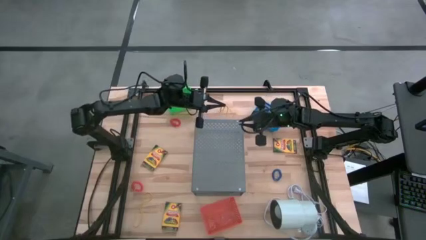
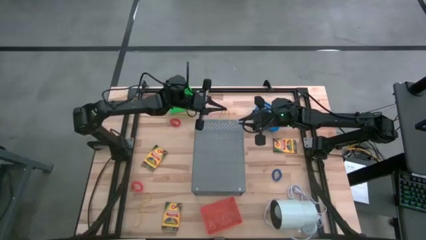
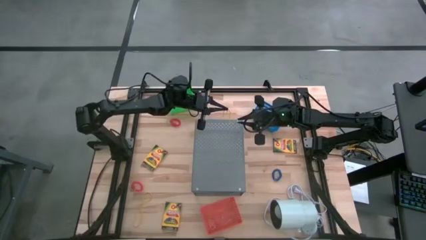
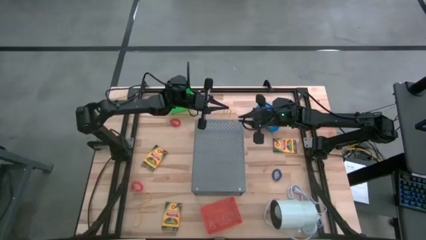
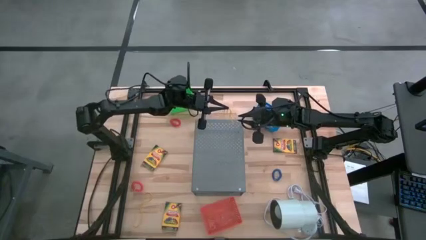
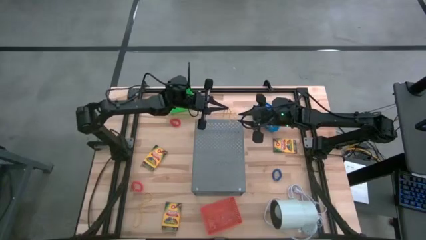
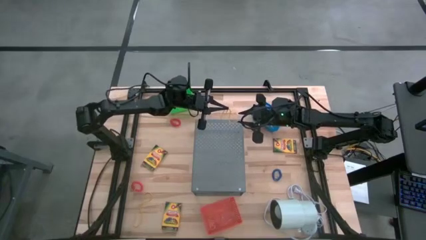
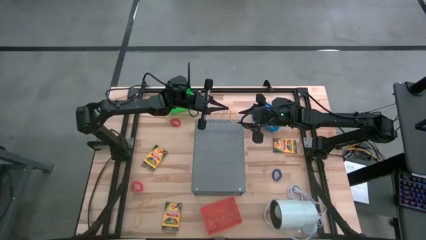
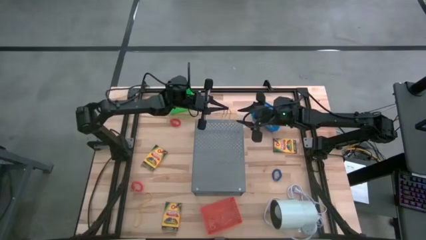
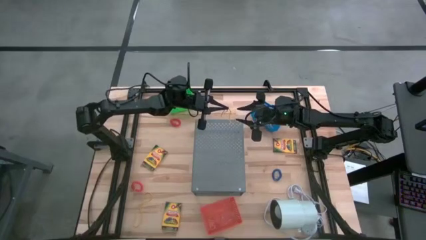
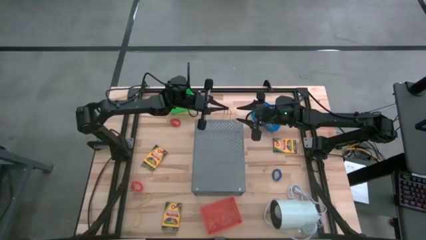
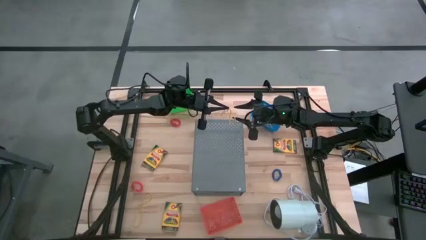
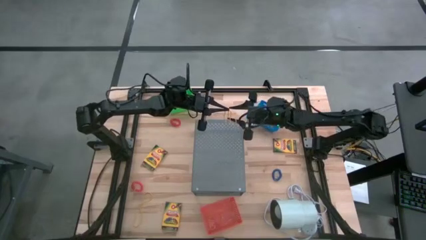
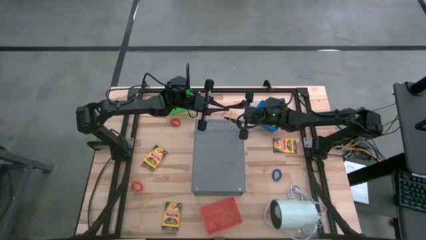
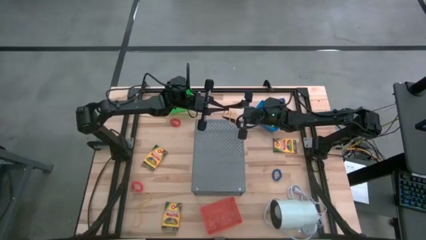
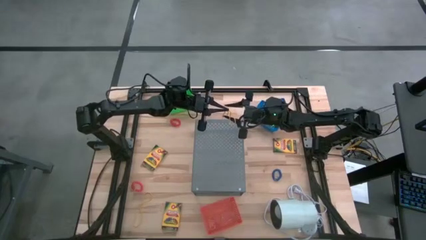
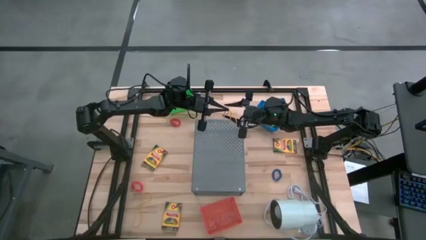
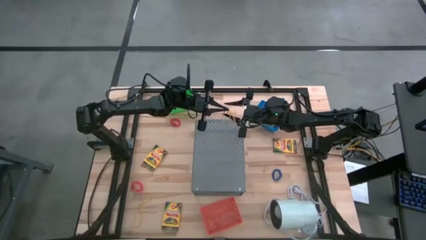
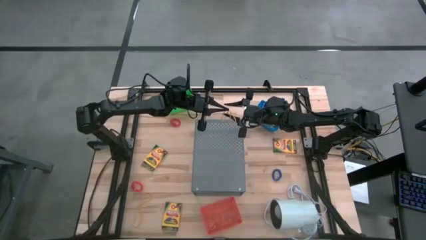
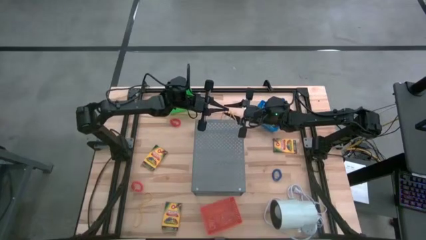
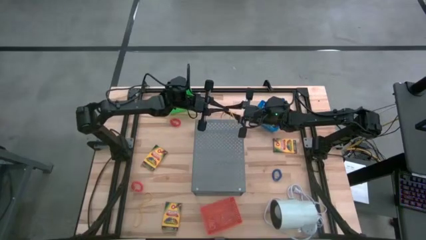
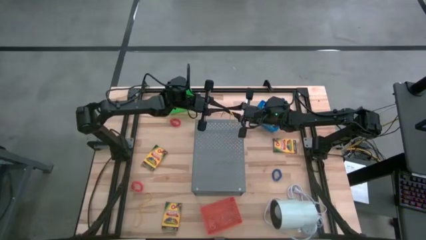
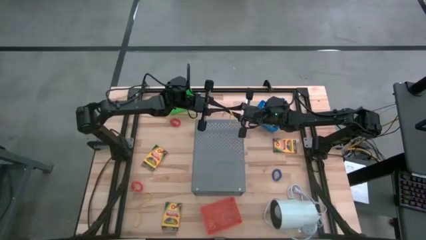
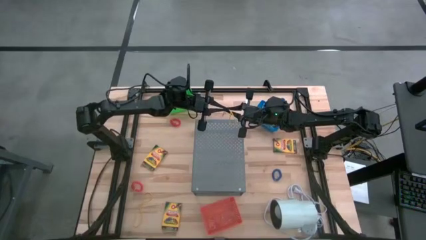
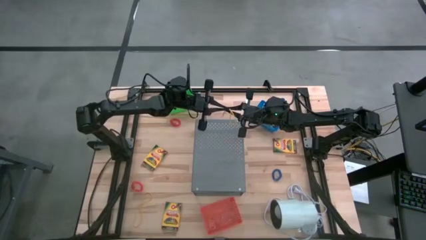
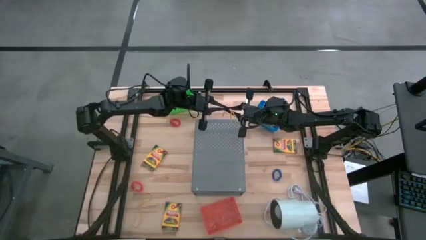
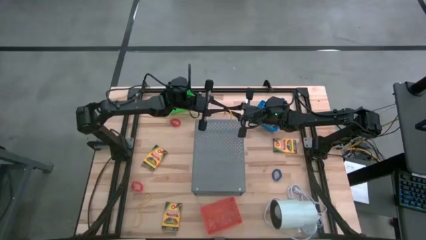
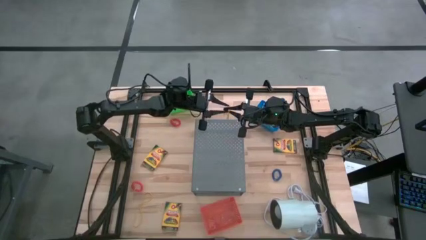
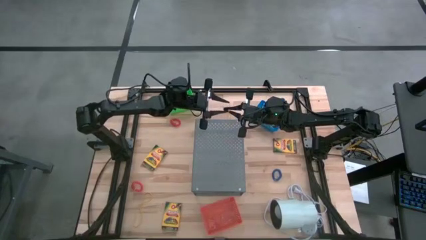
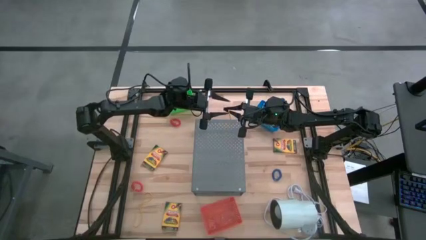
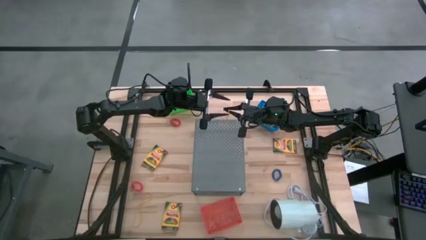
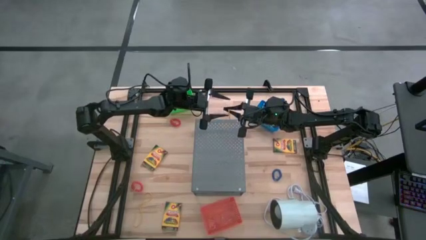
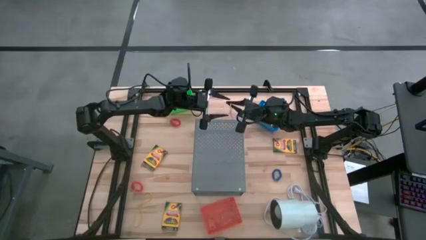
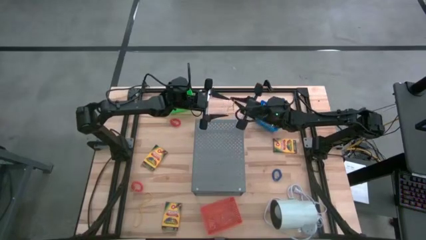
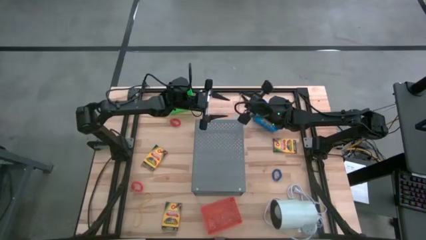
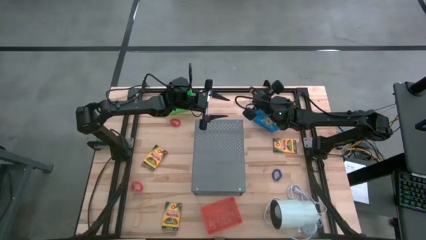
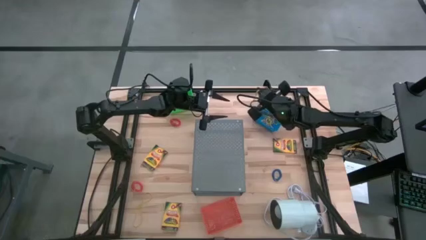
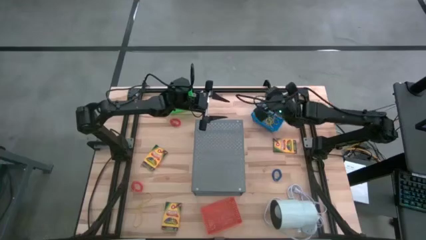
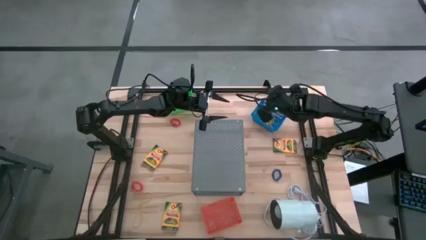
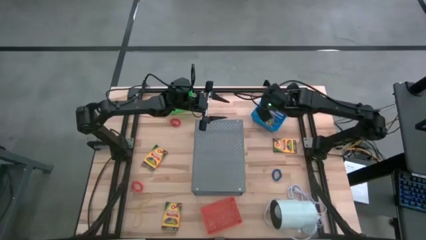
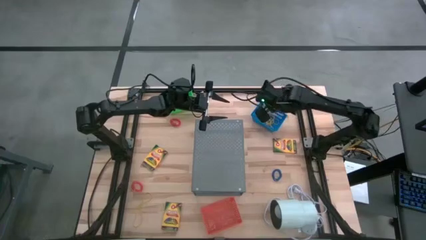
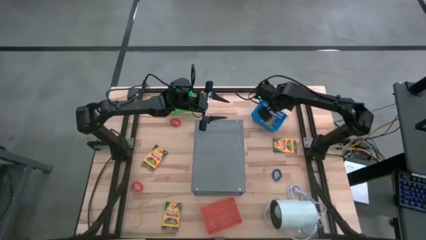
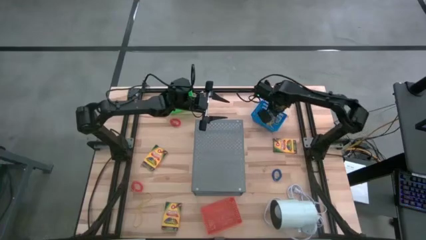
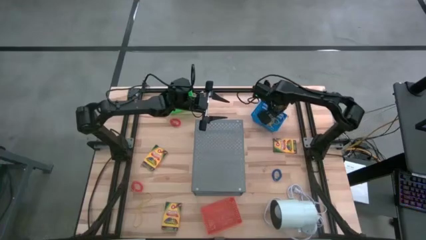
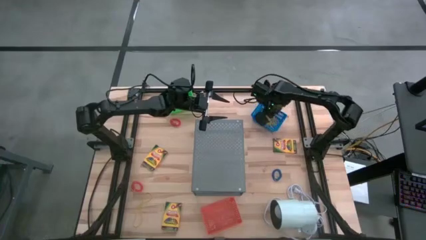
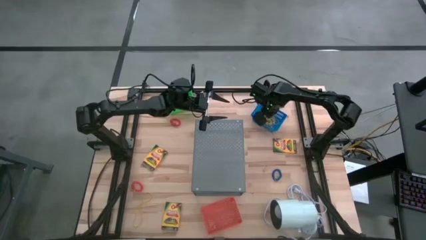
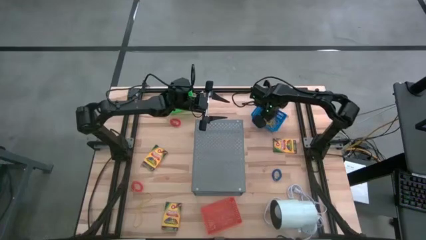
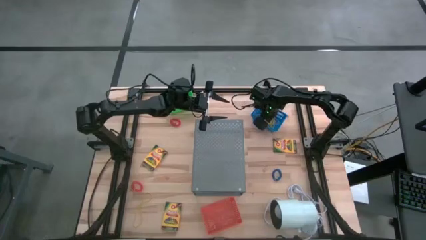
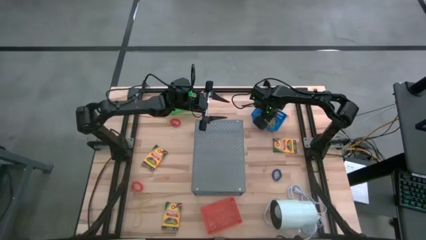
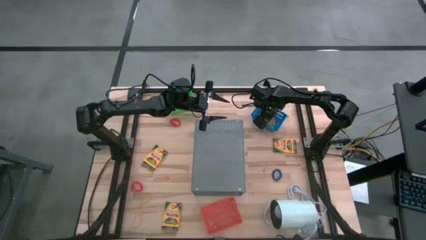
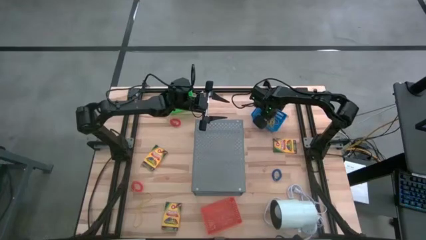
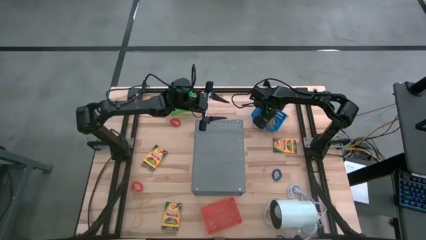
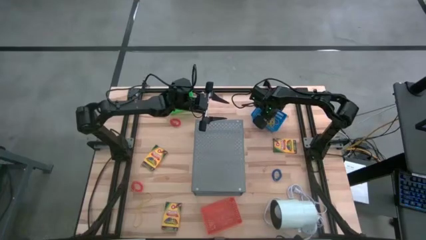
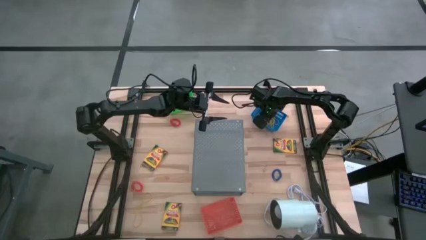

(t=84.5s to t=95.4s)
Task: Pick & Place Office Desk Supplies
Put the top yellow rubber band into the blue basket

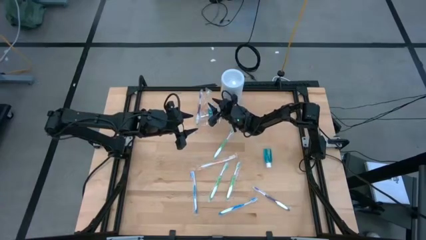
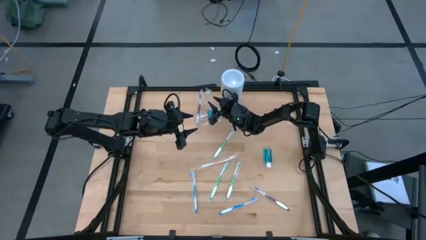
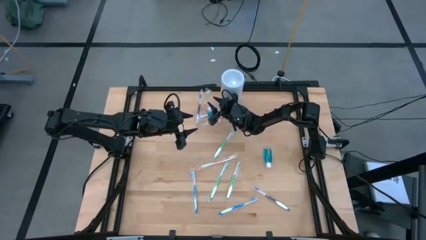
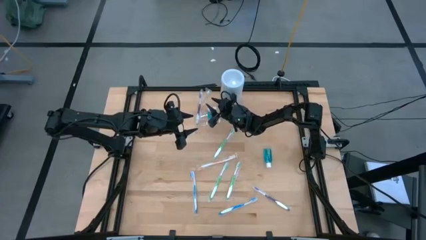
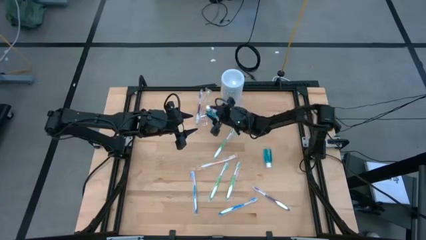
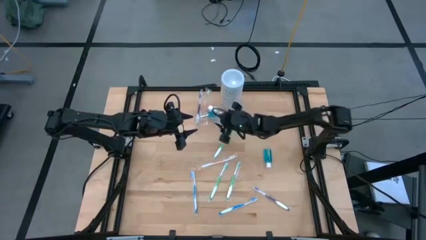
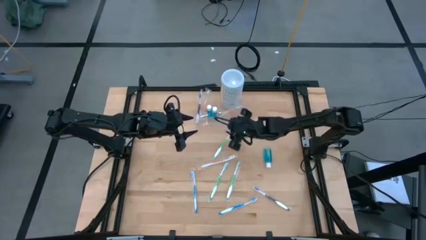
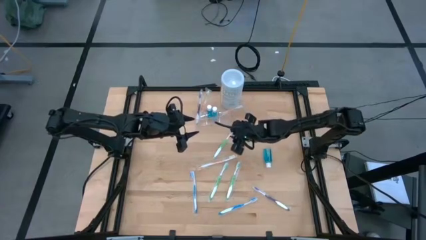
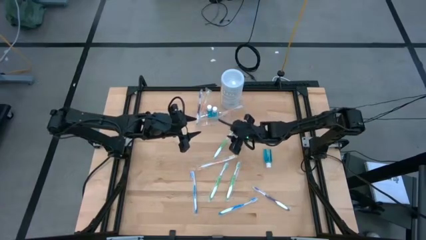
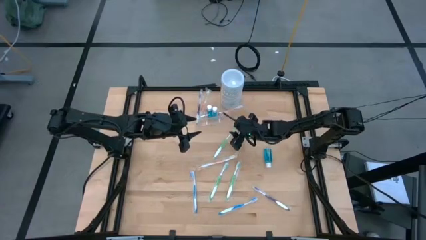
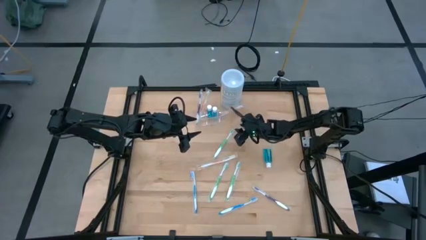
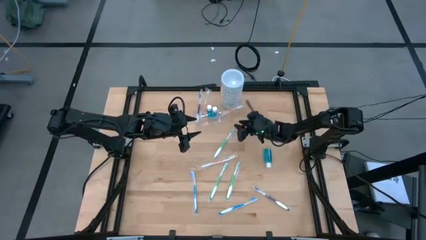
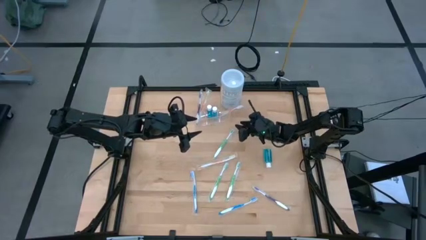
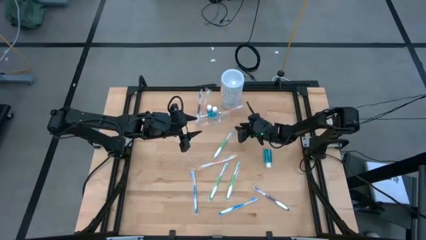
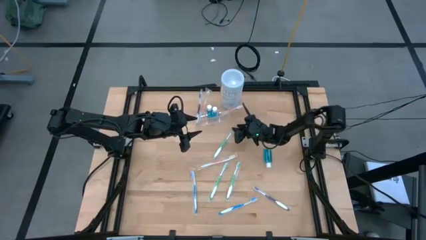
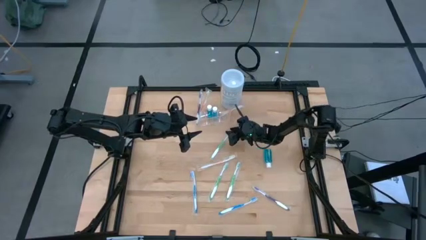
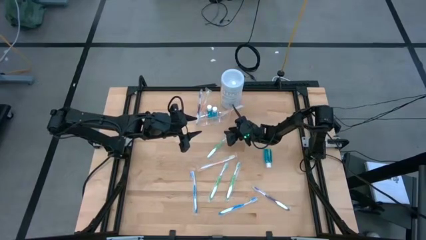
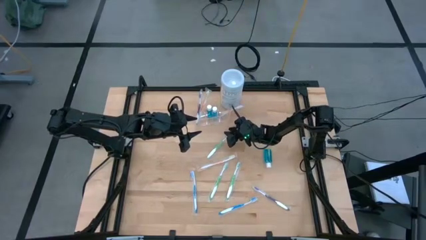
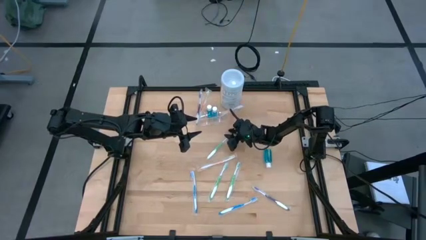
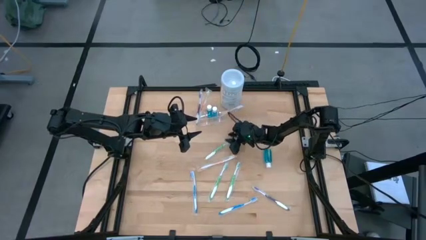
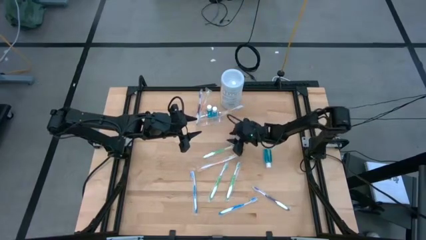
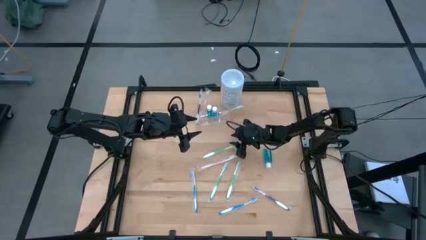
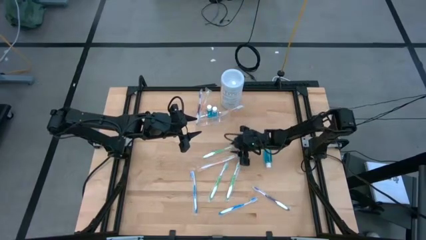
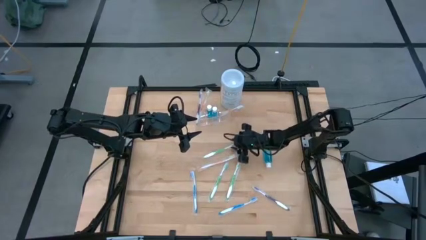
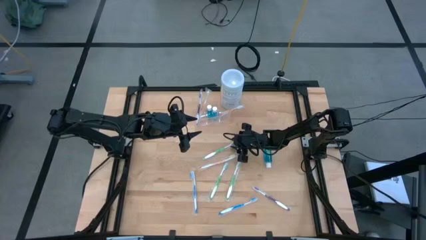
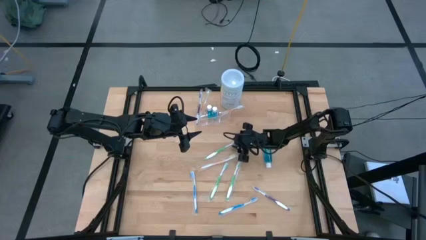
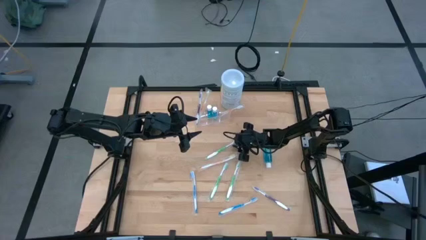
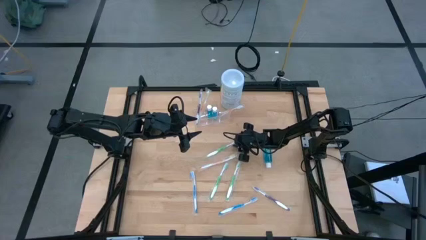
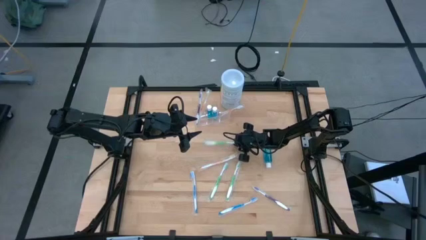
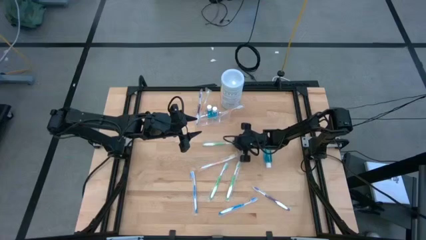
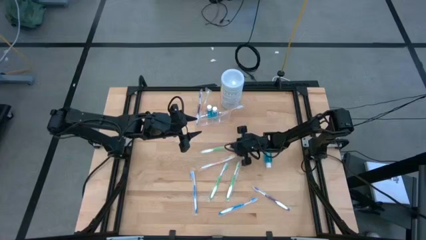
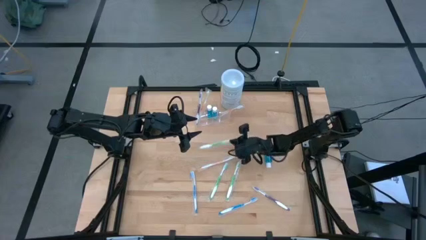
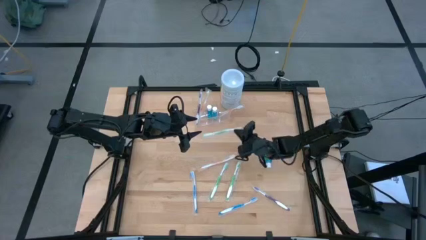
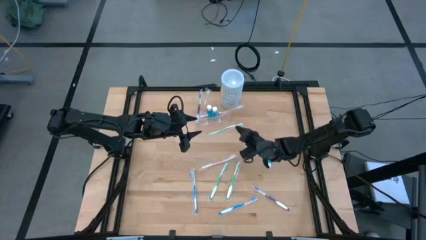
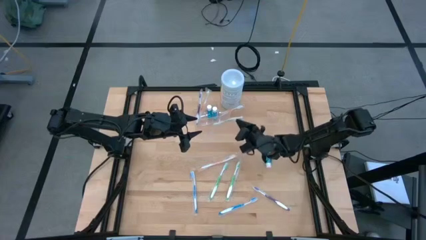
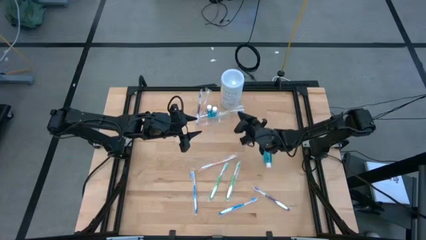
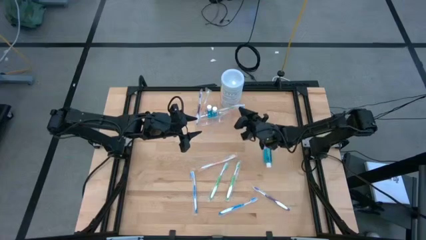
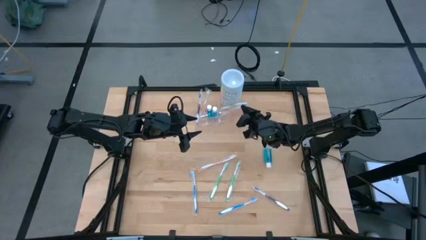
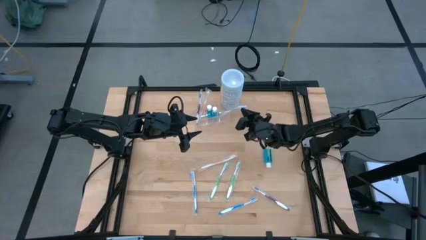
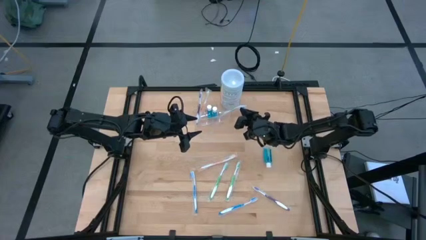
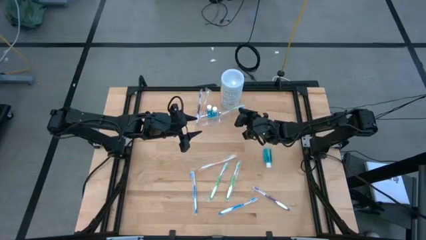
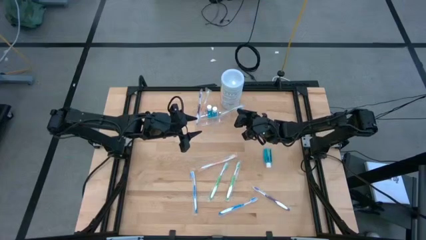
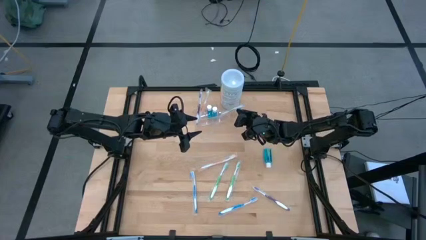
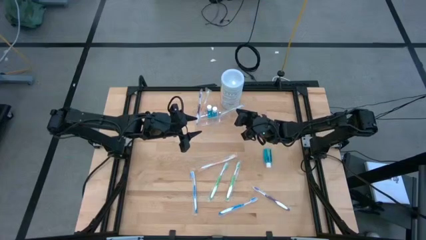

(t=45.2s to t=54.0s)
Task: Pick & Place toothbrushing station
Put the top left green toothbrush into the transparent organizer
